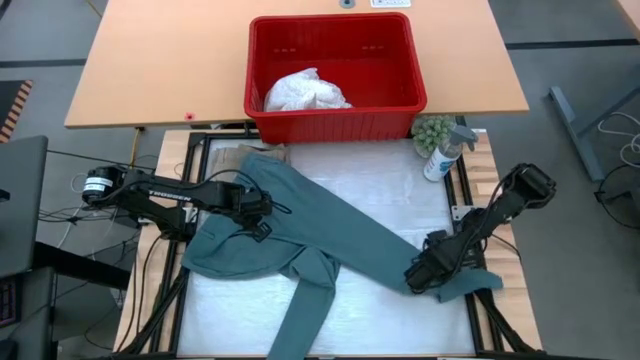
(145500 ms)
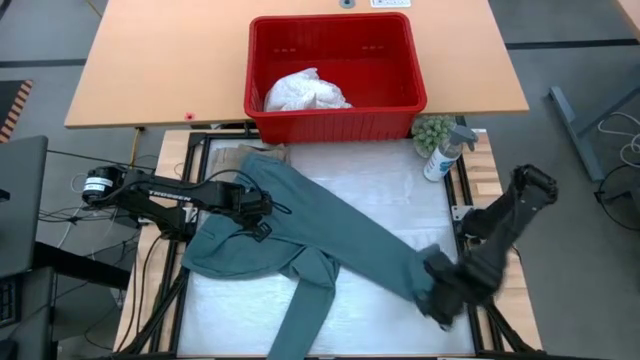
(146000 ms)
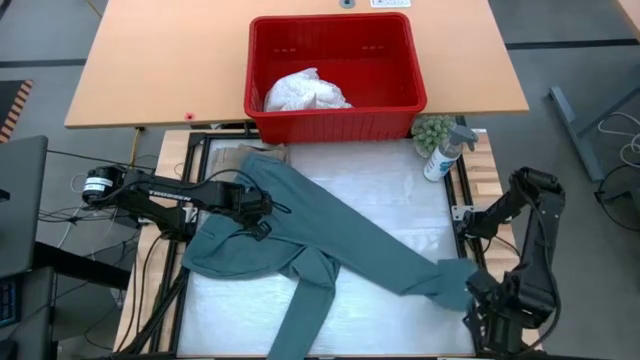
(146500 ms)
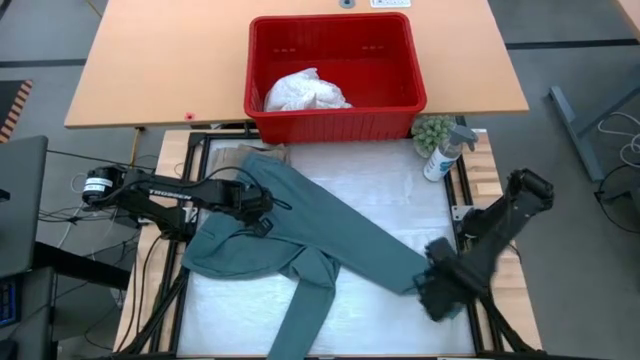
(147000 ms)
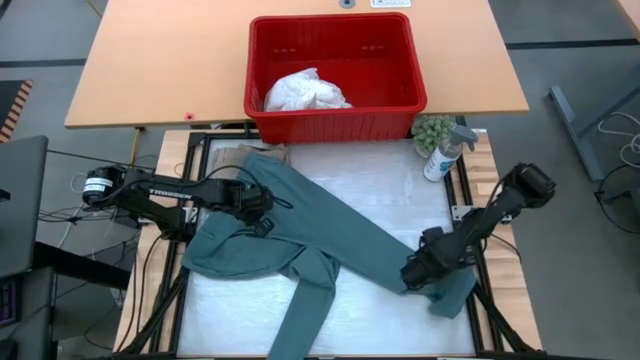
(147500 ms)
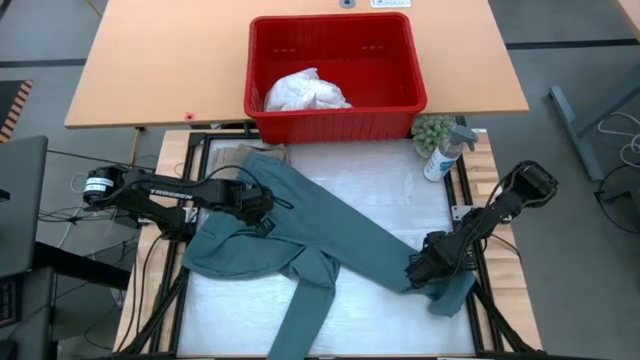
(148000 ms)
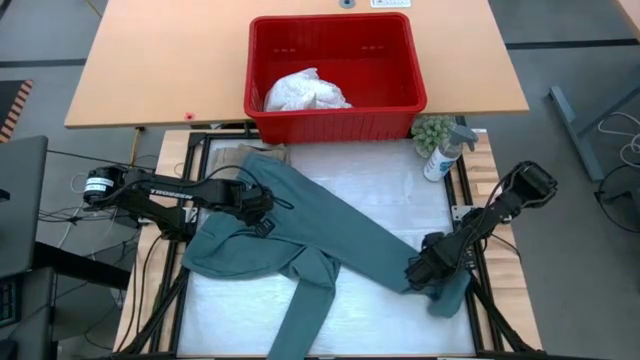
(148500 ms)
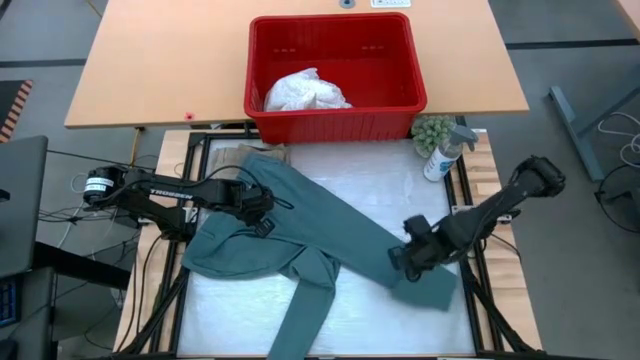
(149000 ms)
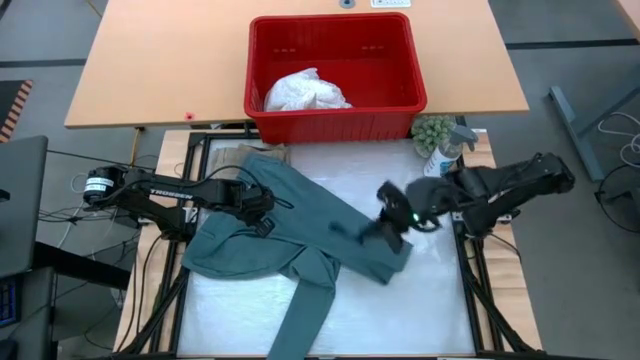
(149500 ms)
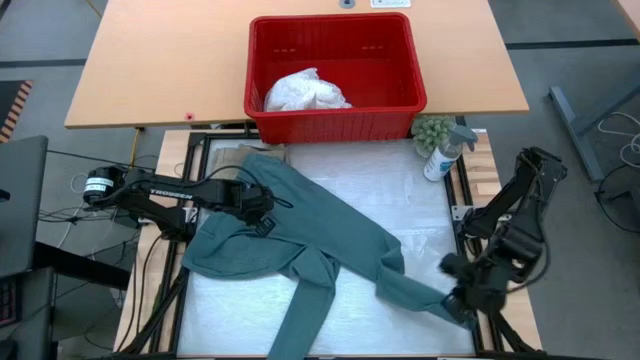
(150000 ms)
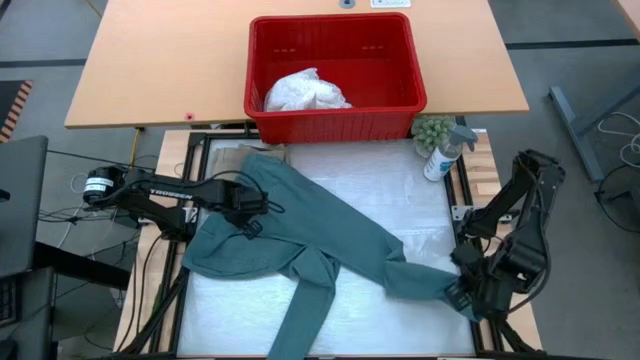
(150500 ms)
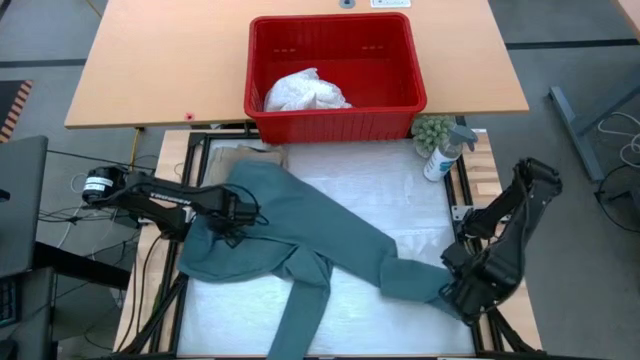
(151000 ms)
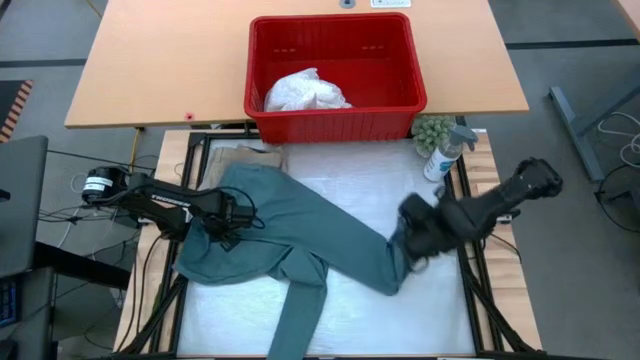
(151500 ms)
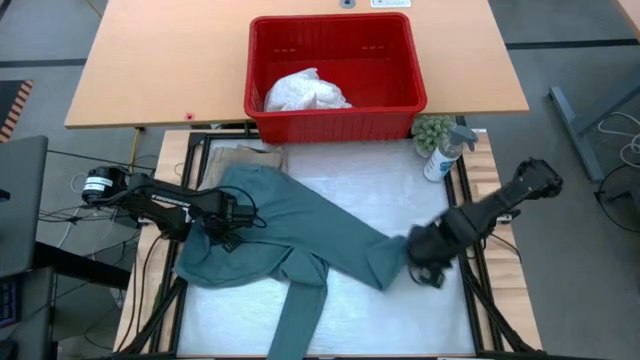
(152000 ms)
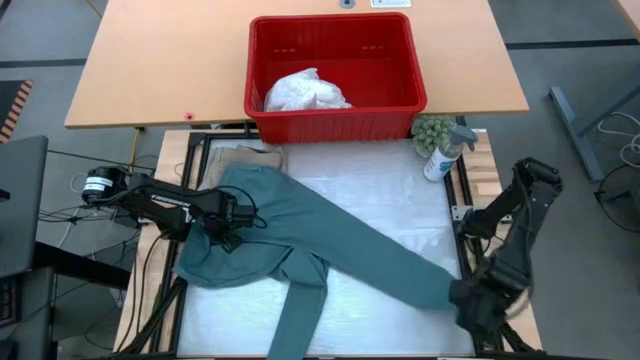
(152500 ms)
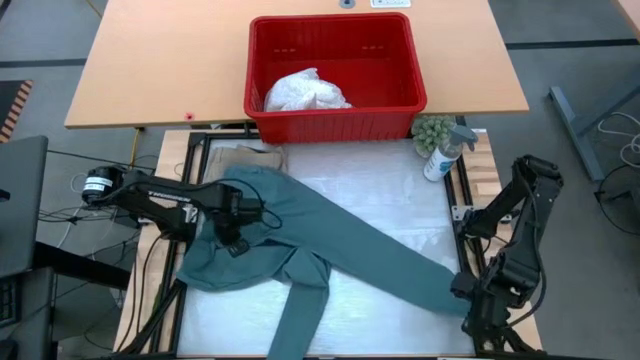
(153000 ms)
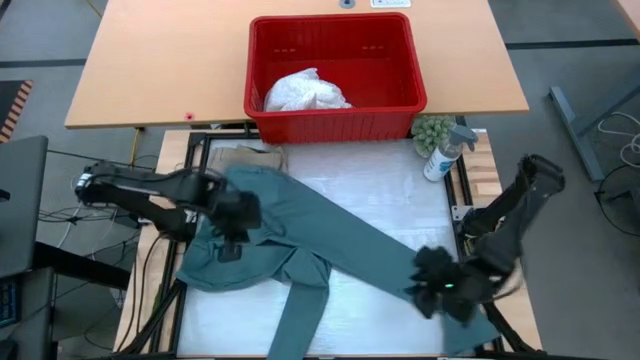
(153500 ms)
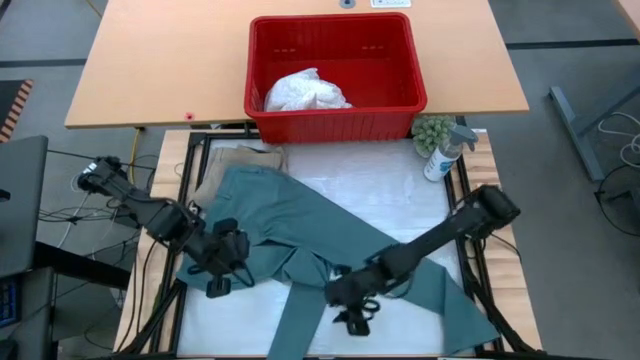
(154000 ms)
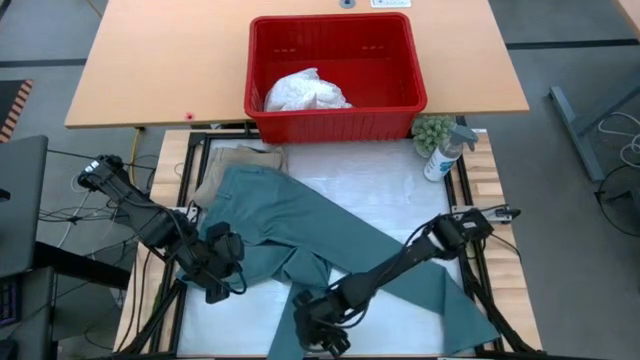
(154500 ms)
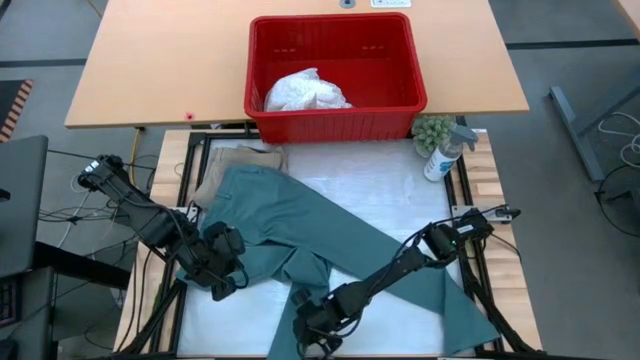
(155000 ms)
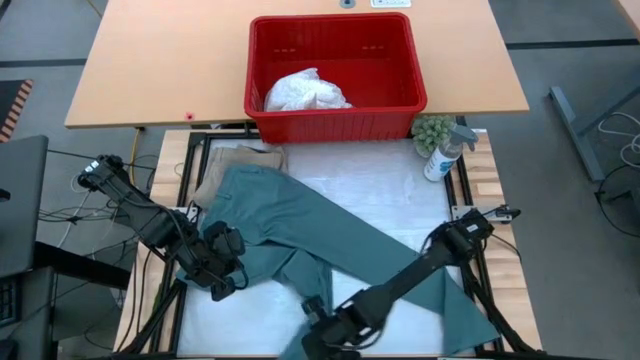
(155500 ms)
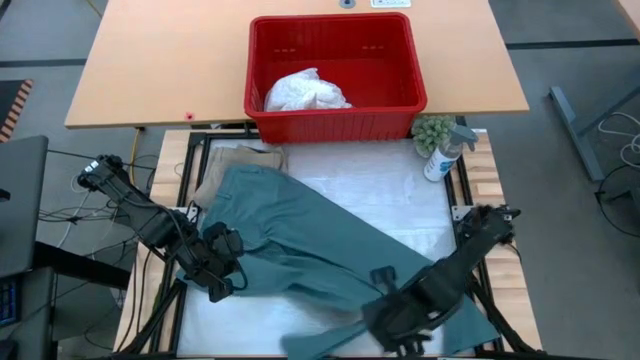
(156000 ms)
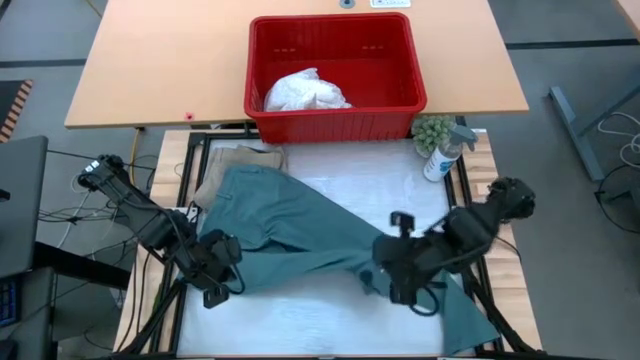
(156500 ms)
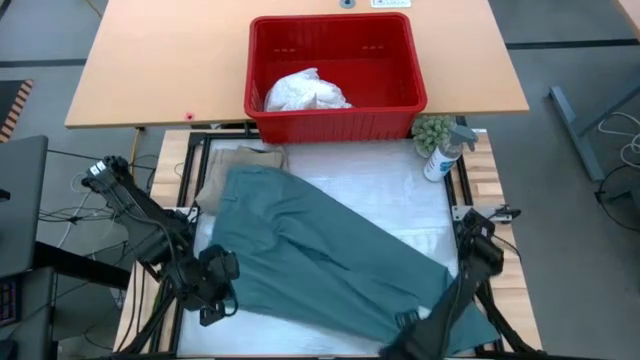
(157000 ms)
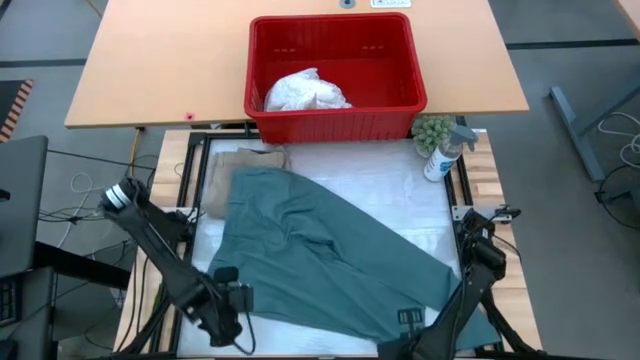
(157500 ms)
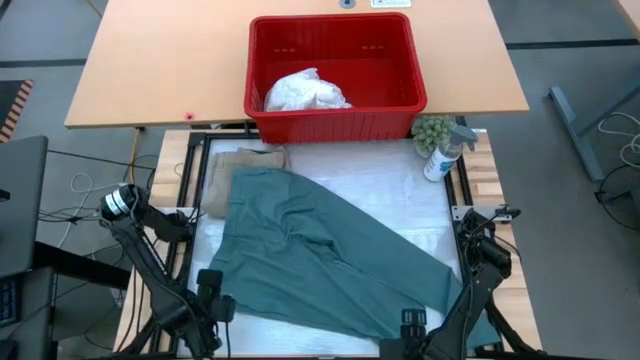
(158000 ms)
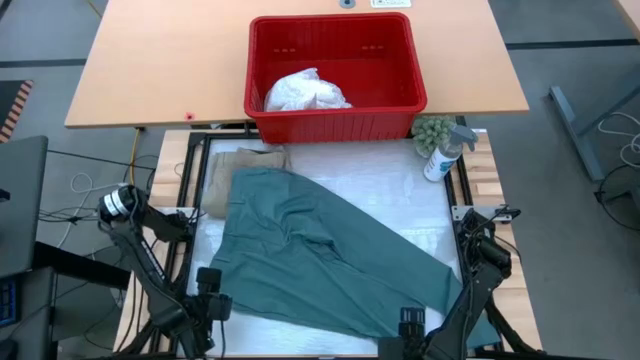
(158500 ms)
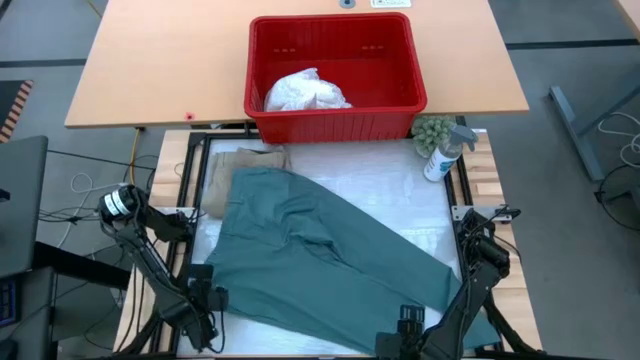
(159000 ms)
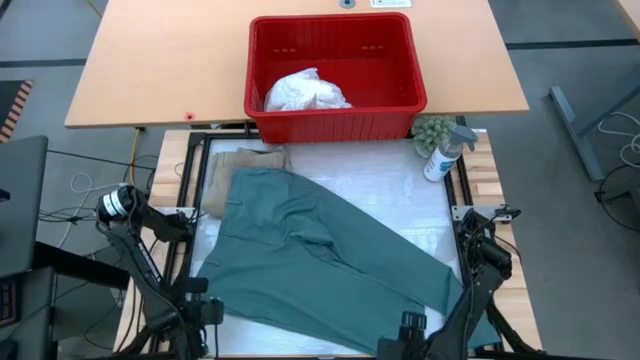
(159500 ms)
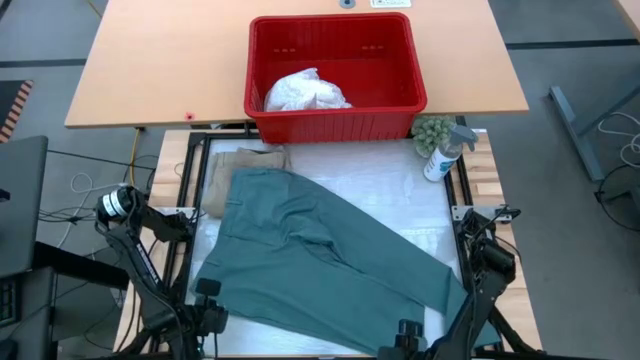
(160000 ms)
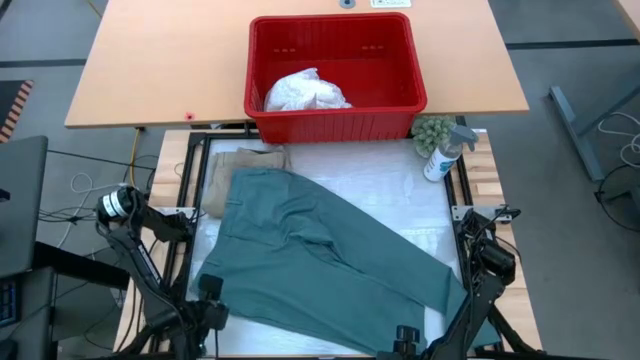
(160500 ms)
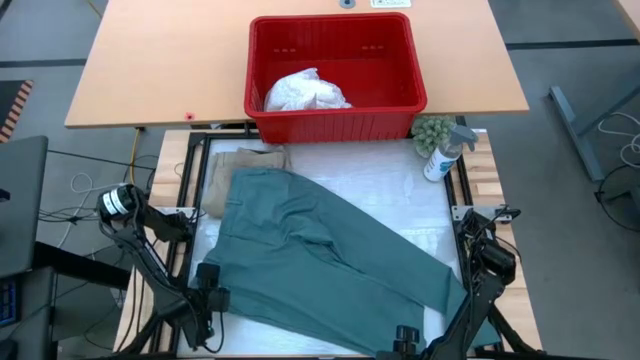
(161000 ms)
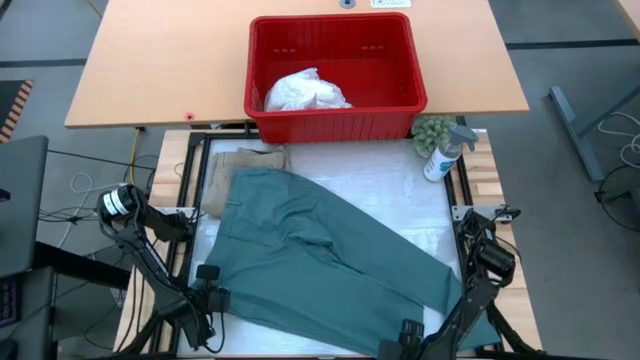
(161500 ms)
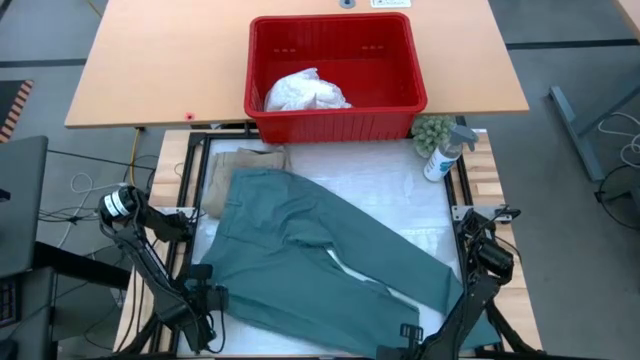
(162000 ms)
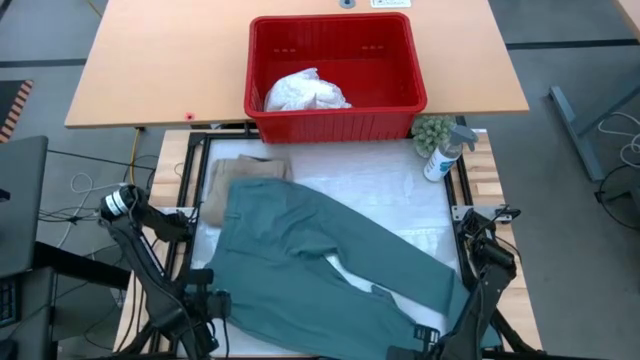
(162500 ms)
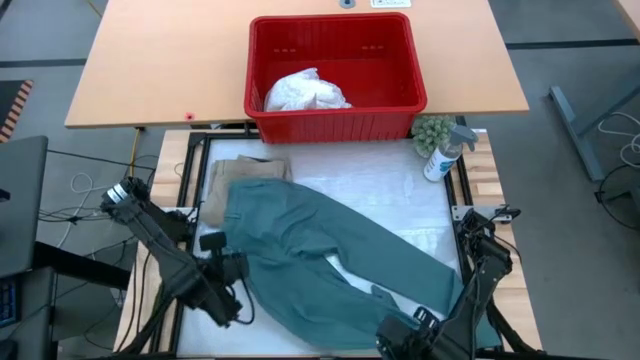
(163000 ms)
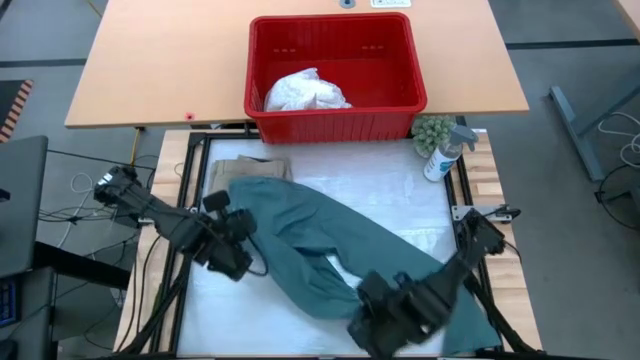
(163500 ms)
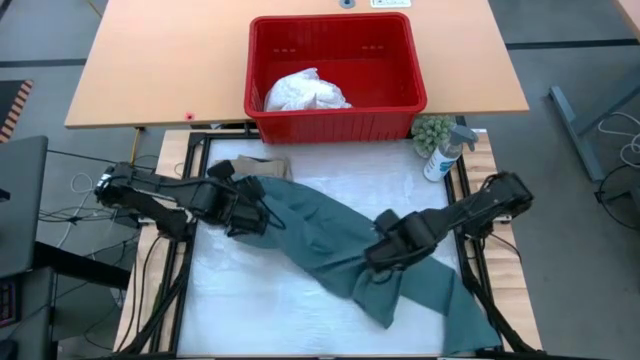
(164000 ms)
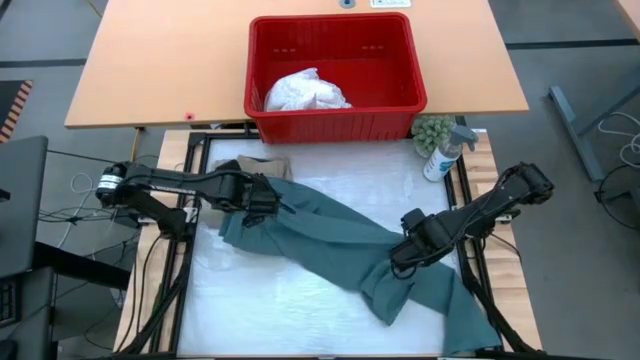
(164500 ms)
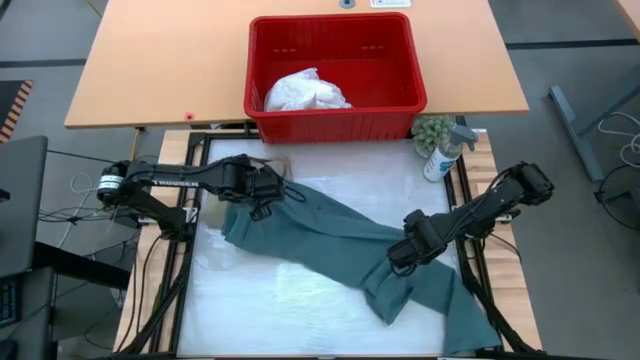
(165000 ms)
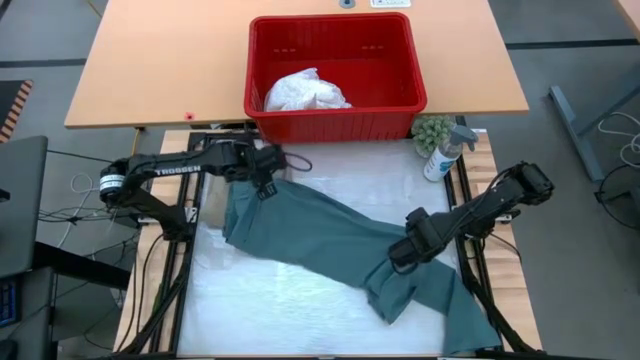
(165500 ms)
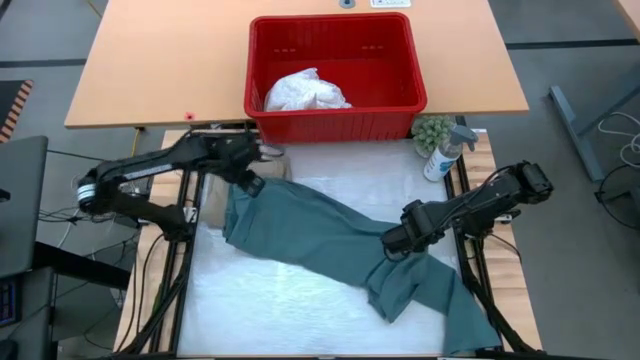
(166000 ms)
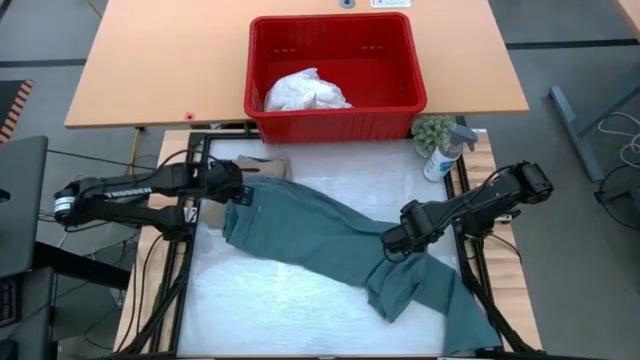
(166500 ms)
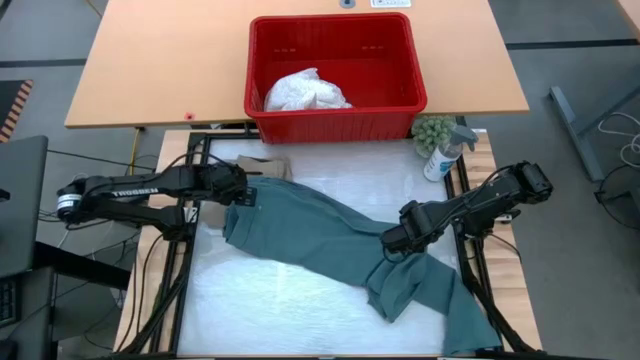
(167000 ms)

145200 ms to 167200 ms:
Task: Fold Laundry from Bin
Fold the blue pants in the red bin
